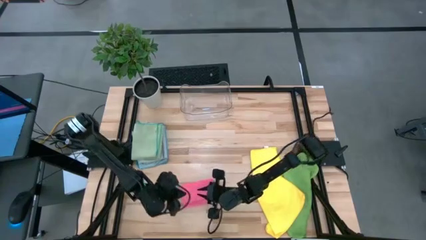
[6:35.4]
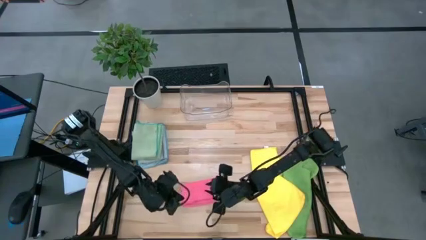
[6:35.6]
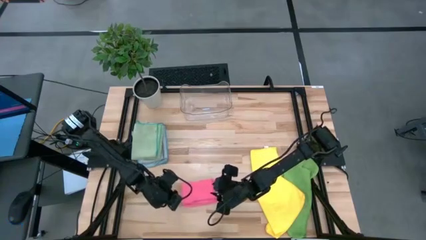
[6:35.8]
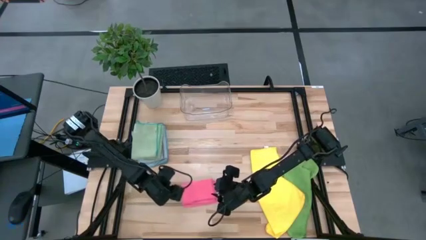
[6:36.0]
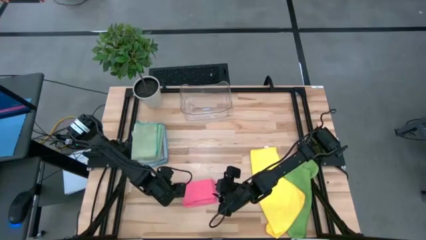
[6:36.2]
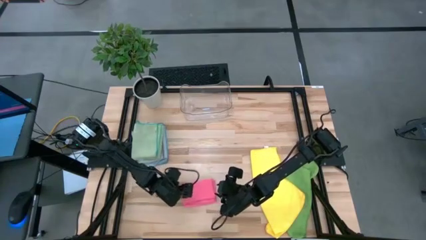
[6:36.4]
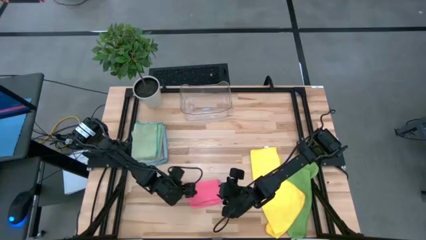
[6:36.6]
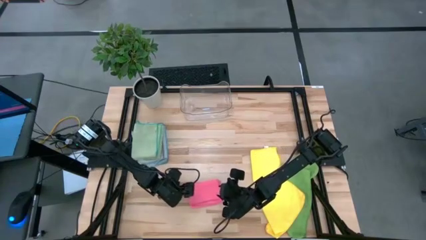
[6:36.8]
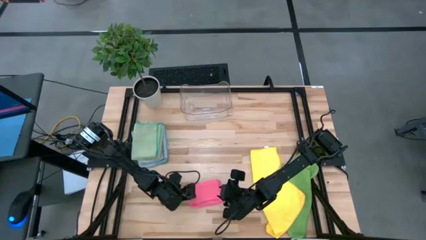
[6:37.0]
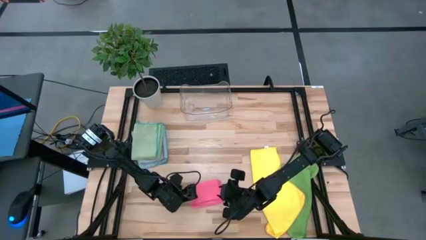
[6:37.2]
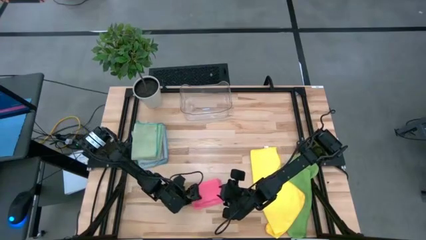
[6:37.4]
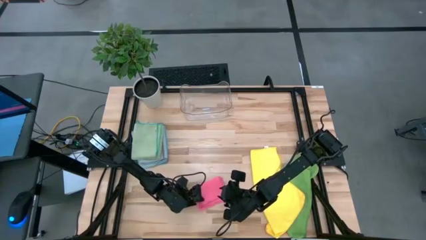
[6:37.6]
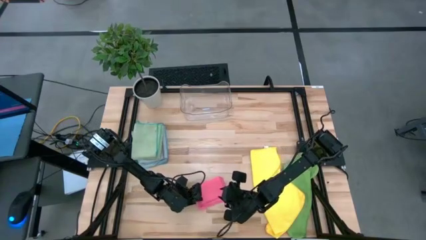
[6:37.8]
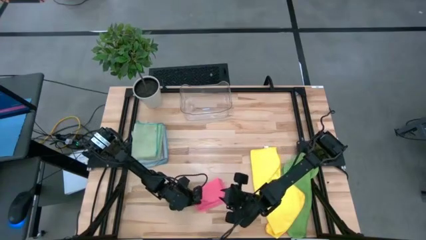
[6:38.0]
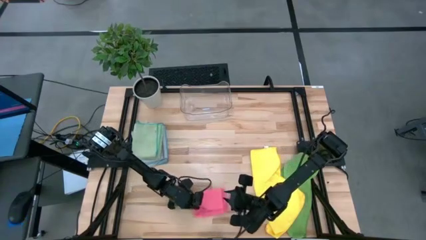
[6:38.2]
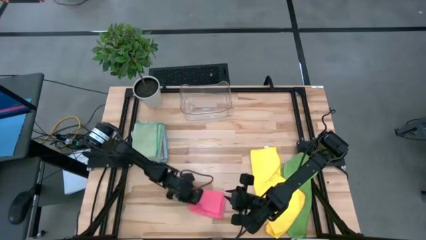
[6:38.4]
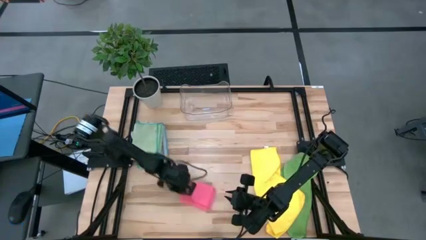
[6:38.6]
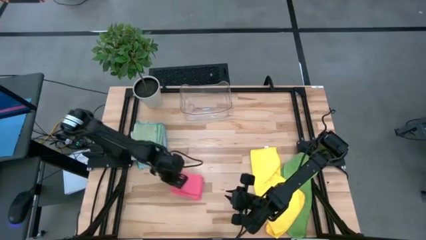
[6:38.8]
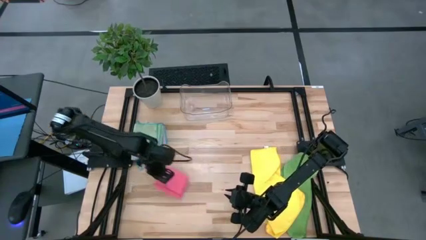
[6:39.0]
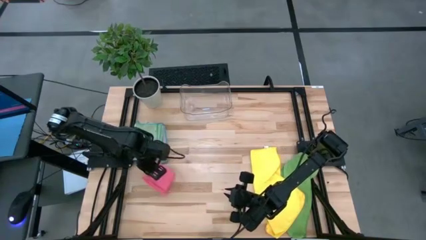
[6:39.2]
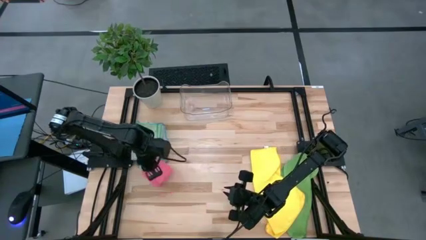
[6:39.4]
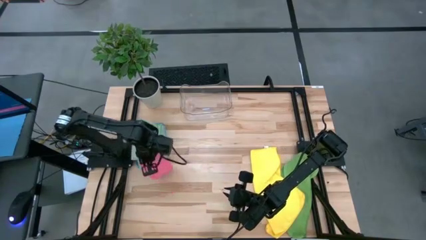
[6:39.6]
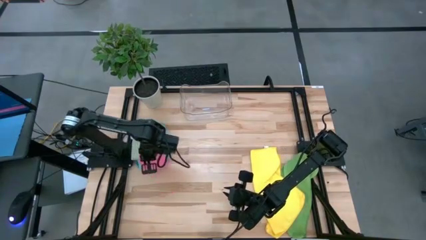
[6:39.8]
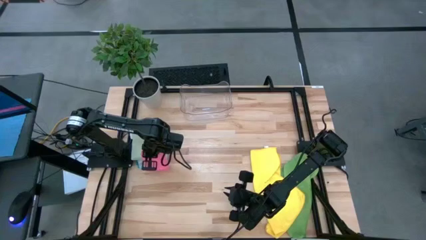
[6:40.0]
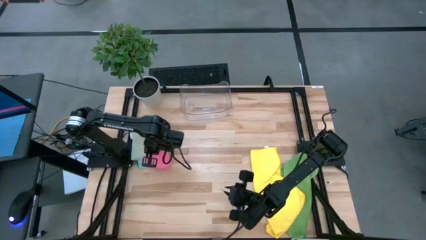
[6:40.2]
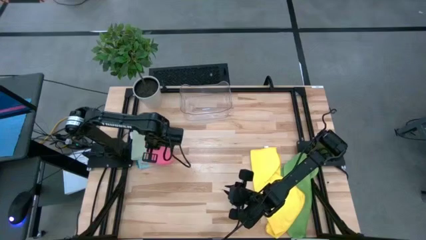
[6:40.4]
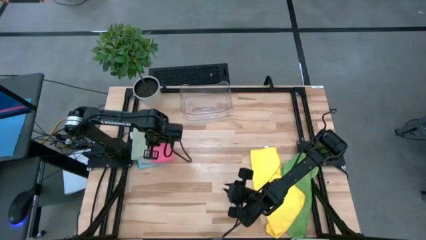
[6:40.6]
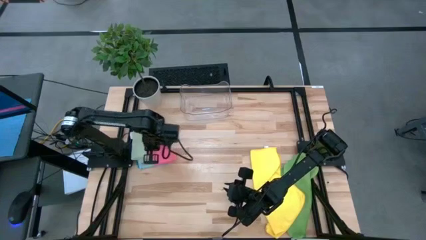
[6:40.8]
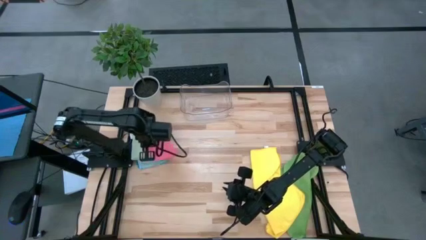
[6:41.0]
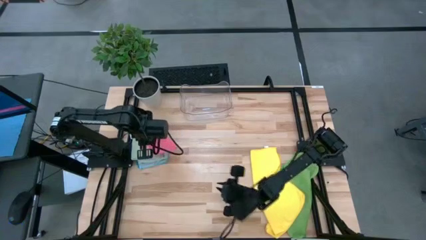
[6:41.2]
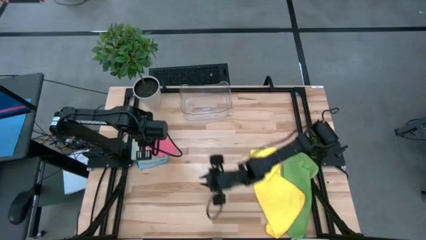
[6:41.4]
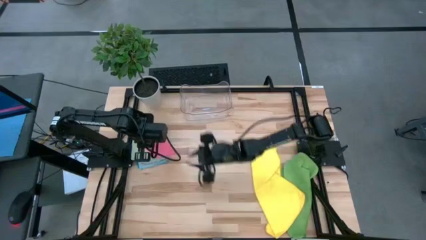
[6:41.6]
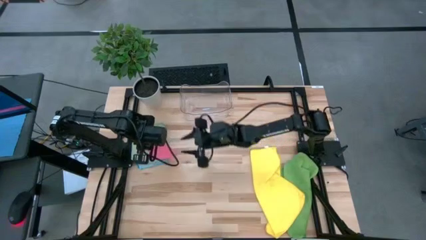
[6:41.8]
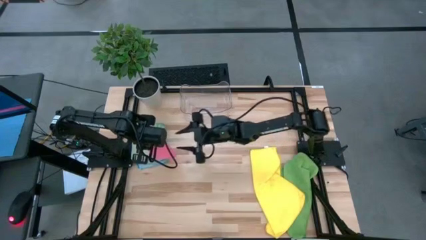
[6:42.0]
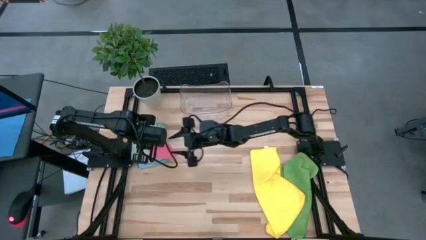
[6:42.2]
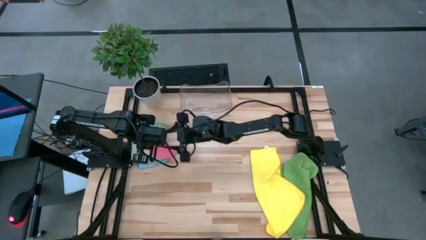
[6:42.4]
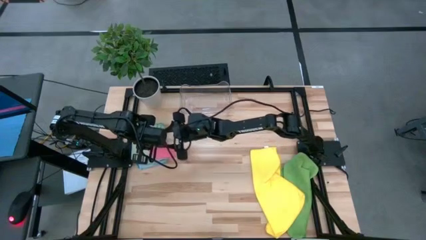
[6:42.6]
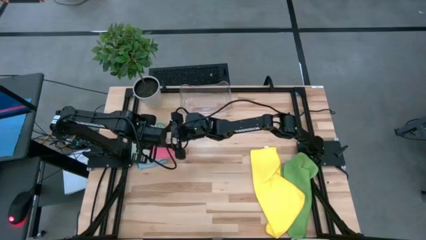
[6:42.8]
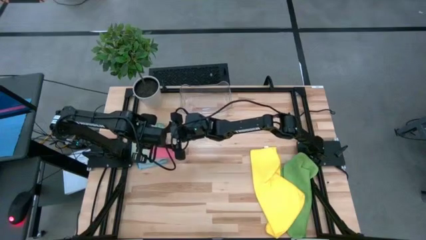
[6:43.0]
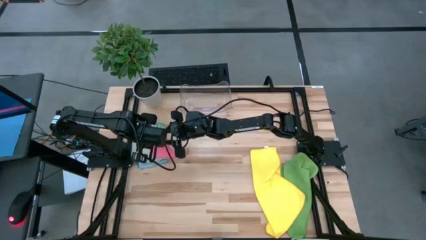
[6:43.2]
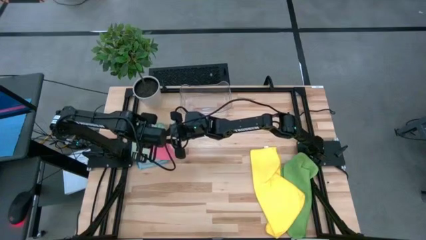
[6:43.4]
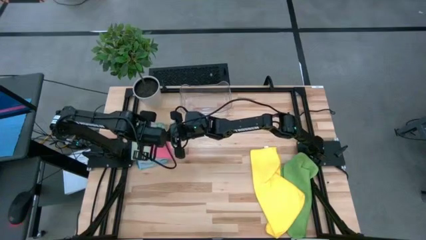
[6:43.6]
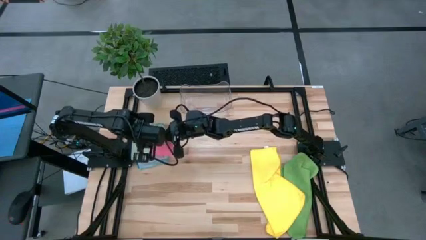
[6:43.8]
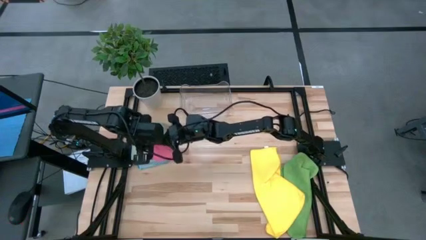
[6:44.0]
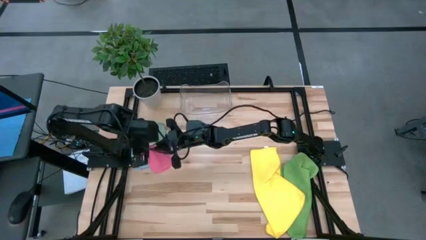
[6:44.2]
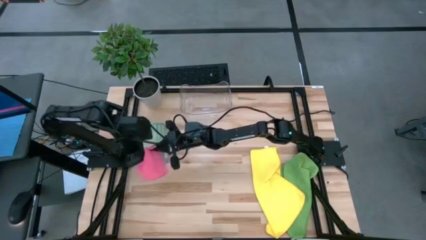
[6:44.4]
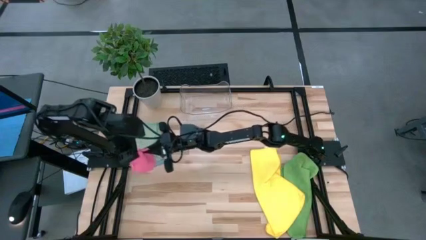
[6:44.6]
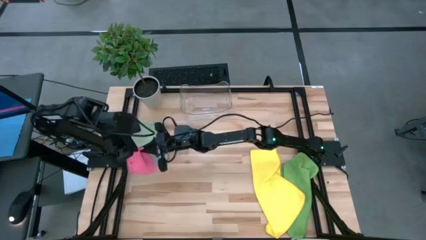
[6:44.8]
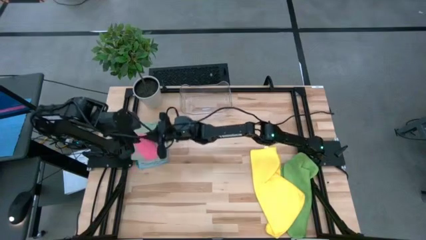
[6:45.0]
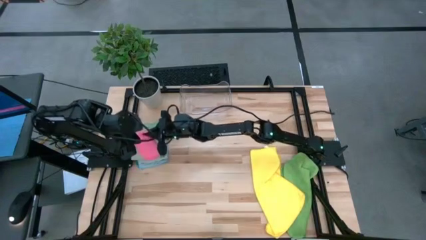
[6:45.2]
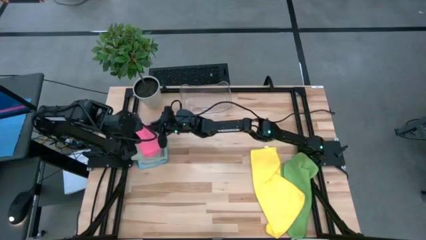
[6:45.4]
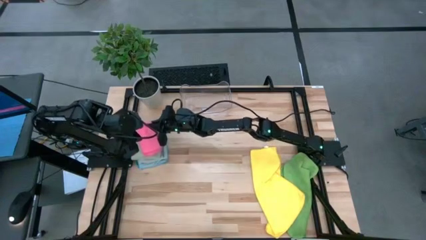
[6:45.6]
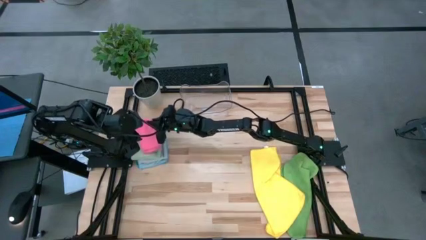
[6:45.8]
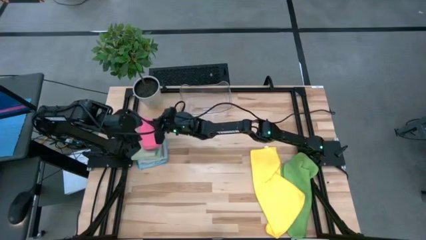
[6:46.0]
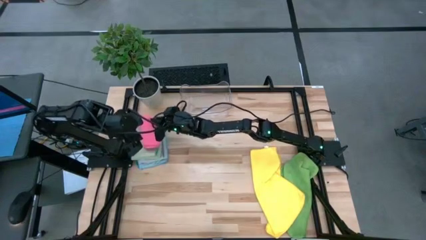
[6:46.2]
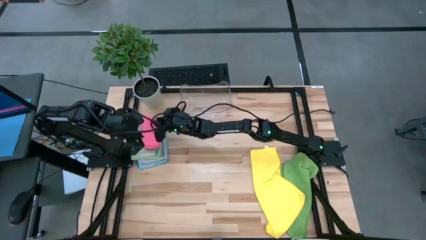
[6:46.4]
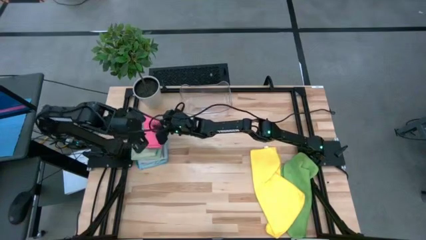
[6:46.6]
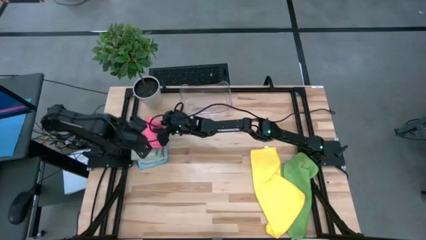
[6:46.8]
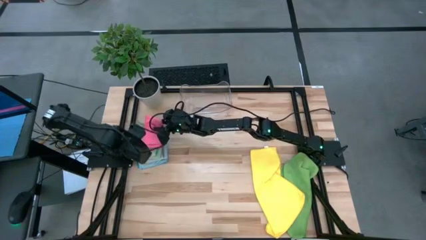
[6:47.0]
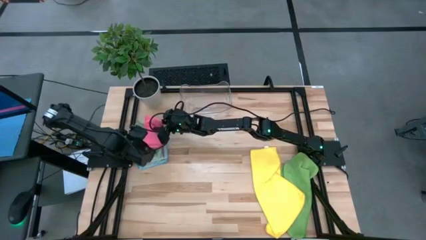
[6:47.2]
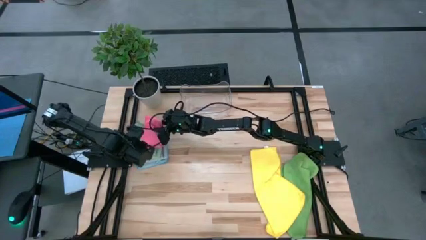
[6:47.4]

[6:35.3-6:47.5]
Task: Fold microfiber towels
Stack the folded pink microfiber cloth on top of the folded light green microfiber cloth

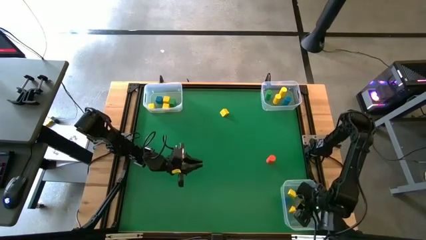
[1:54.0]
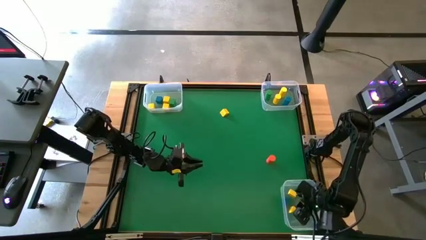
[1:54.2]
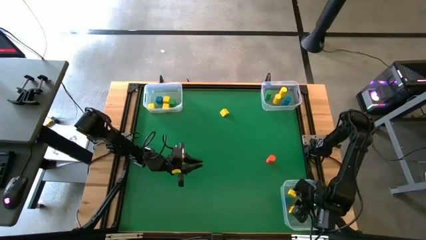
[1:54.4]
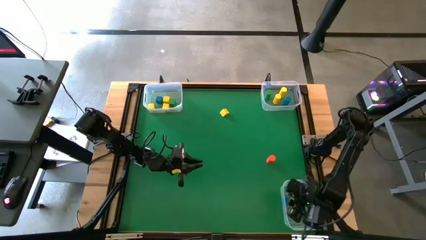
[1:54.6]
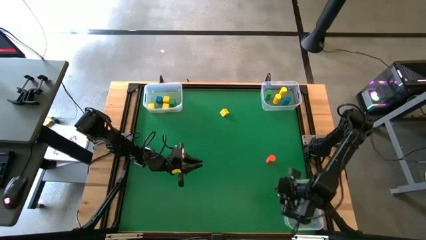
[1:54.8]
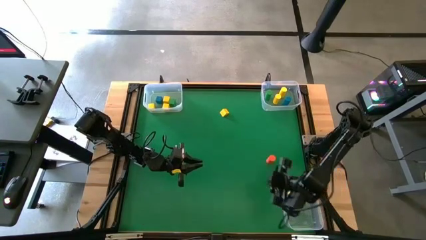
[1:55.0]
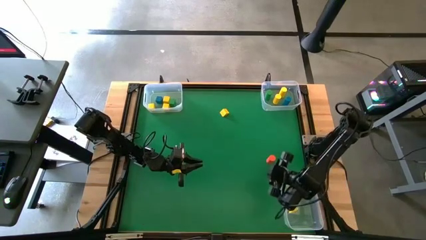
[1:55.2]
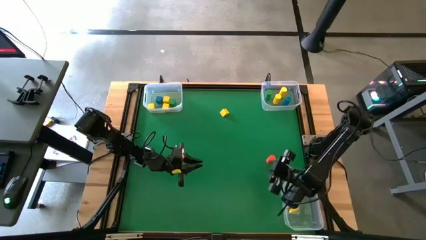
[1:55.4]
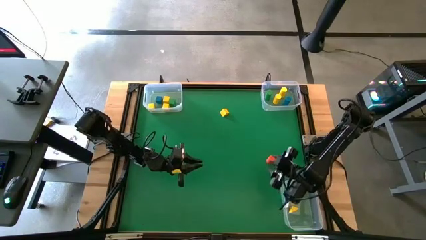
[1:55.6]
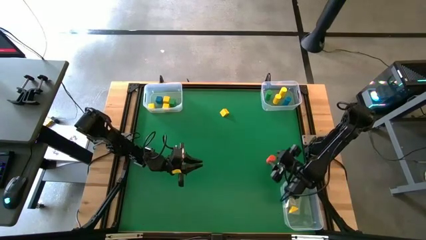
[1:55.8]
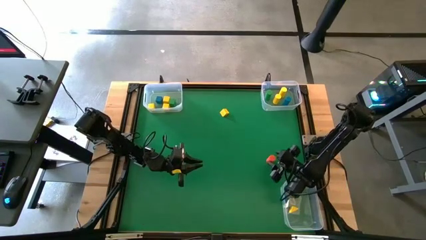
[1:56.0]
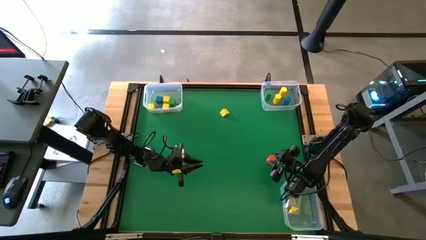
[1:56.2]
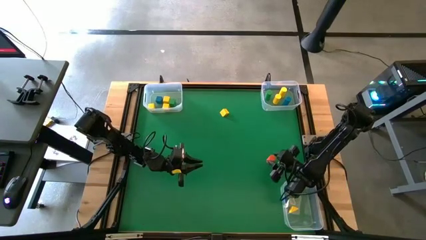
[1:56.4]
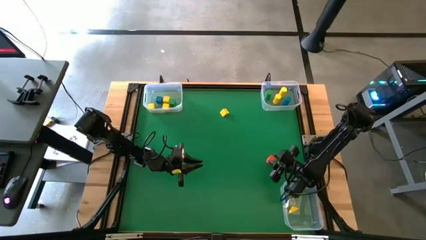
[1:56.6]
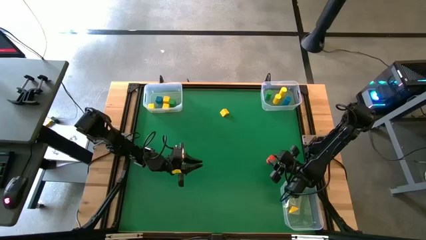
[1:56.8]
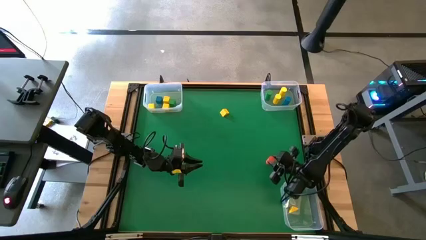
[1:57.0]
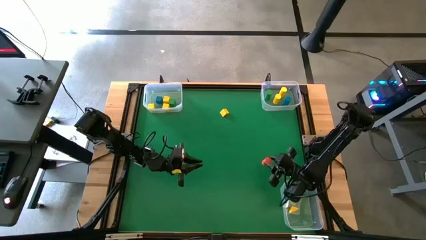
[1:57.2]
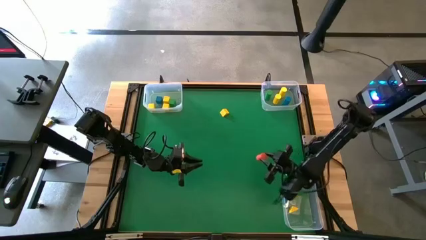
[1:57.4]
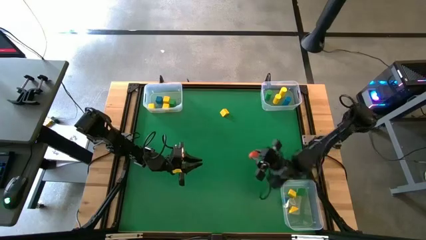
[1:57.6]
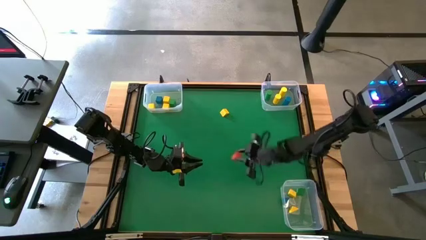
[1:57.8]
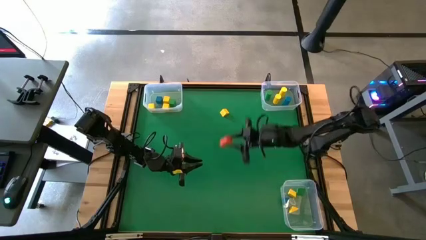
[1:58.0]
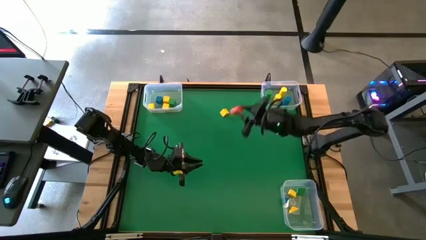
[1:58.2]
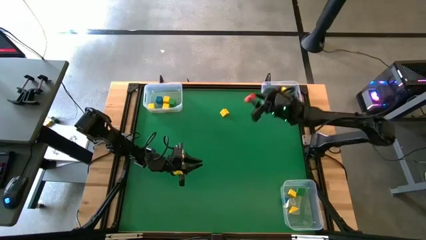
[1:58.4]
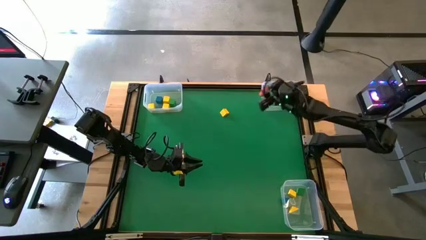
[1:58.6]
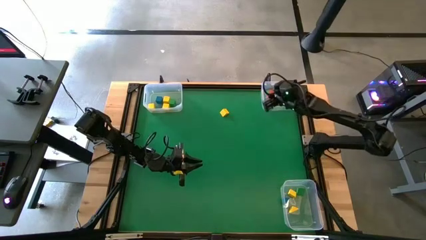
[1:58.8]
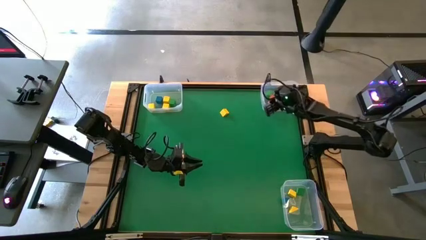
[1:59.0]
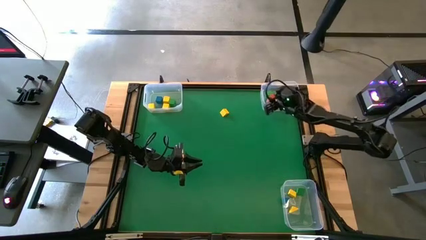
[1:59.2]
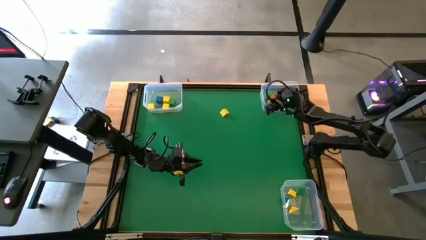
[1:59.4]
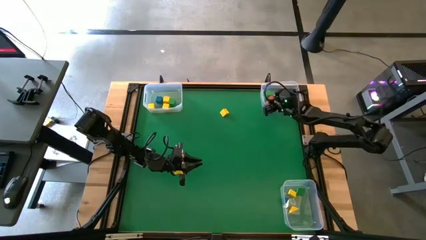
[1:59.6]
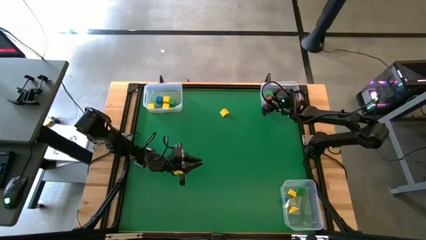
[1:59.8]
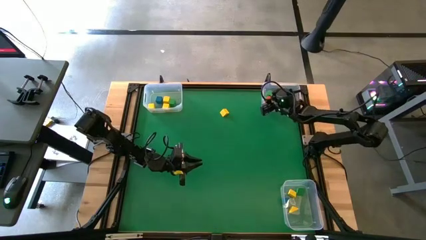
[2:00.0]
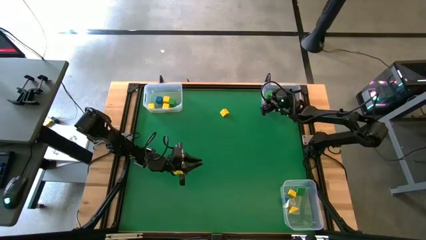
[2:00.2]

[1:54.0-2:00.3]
Task: Sort blocks by size
Put the orange cylindrical block into the top right transparent bin
